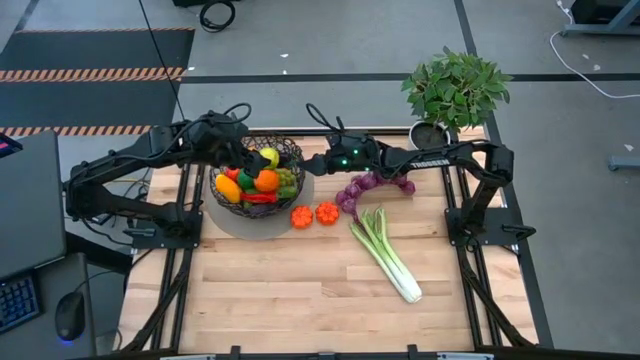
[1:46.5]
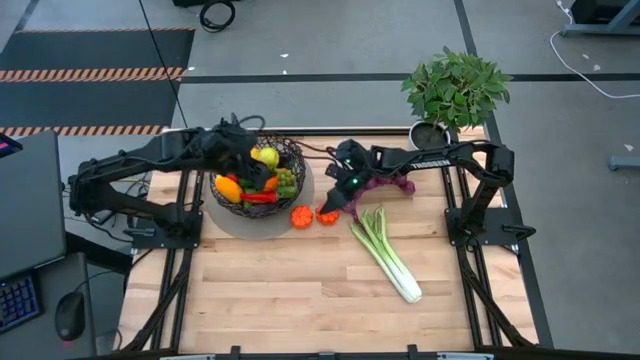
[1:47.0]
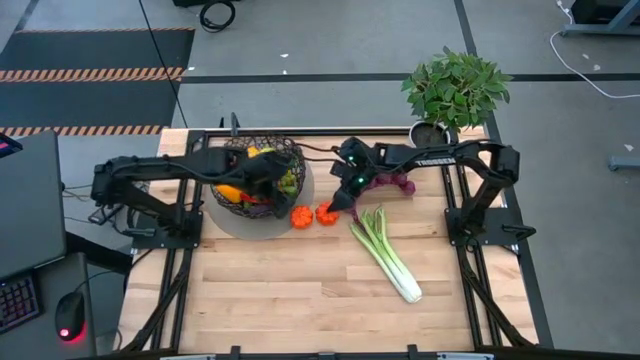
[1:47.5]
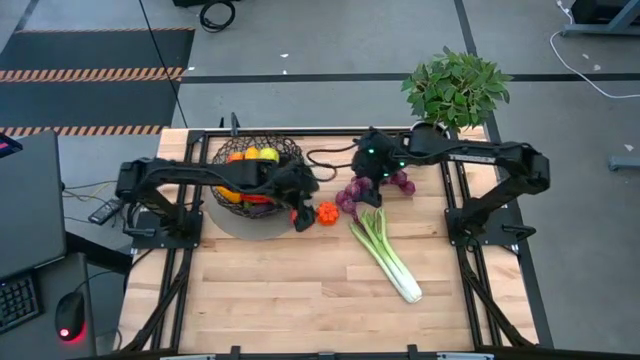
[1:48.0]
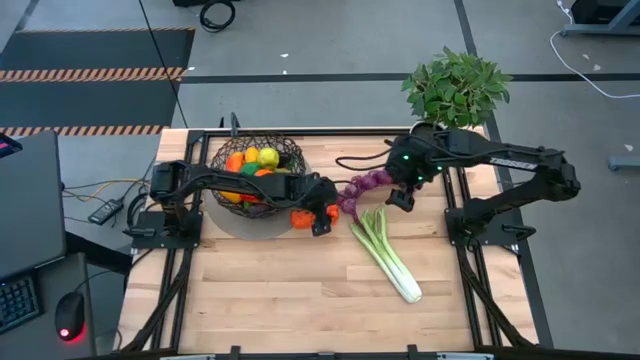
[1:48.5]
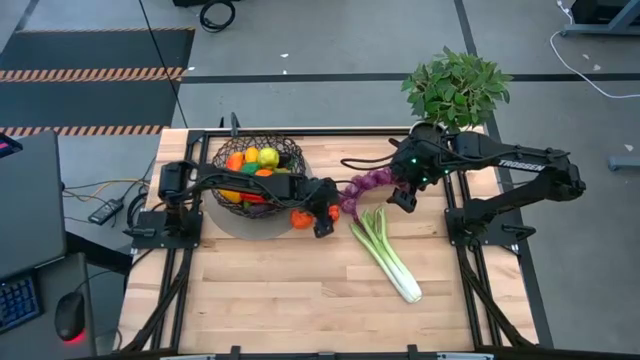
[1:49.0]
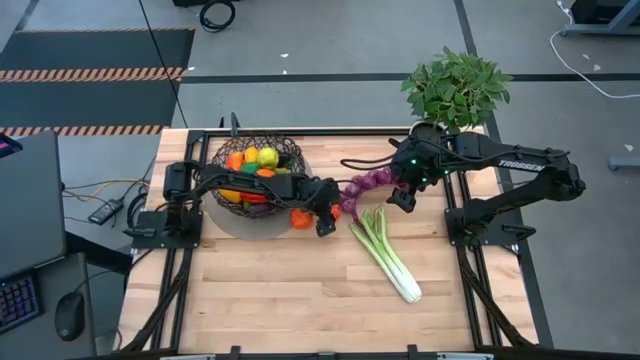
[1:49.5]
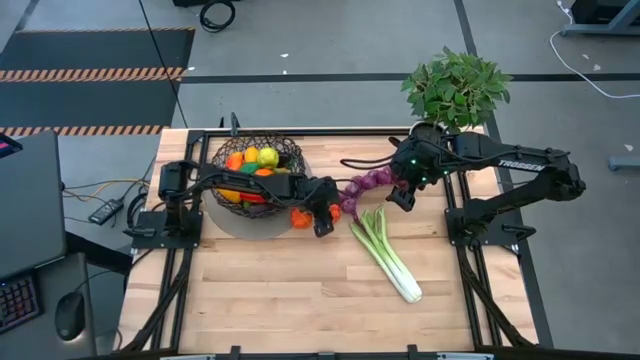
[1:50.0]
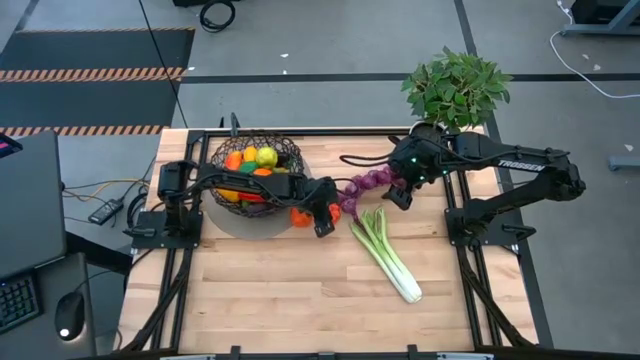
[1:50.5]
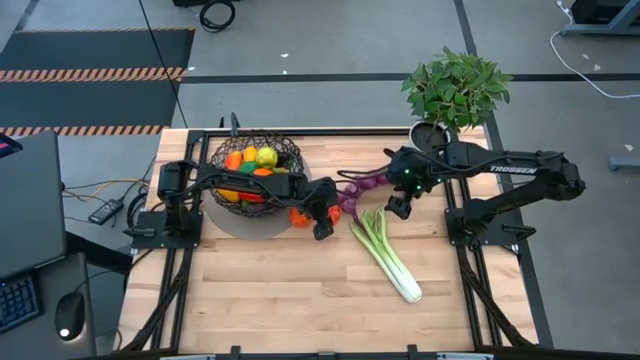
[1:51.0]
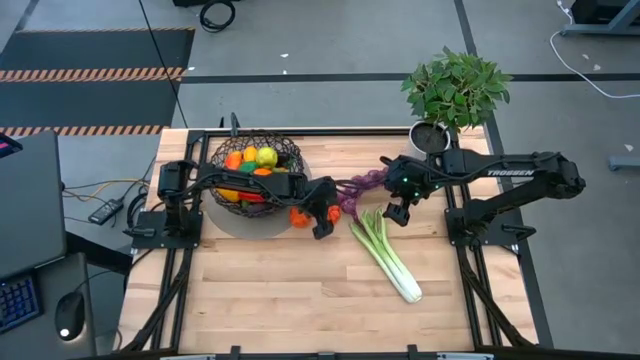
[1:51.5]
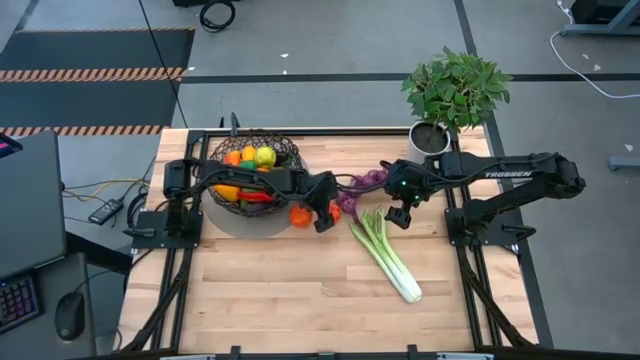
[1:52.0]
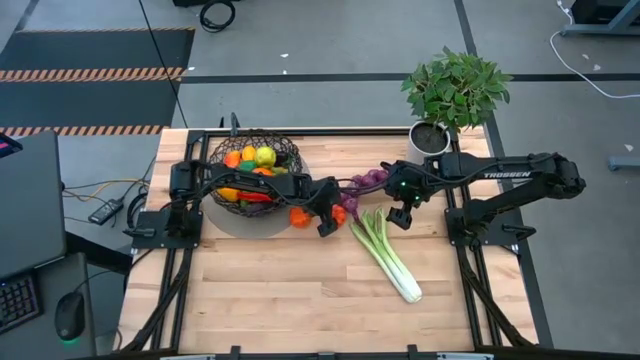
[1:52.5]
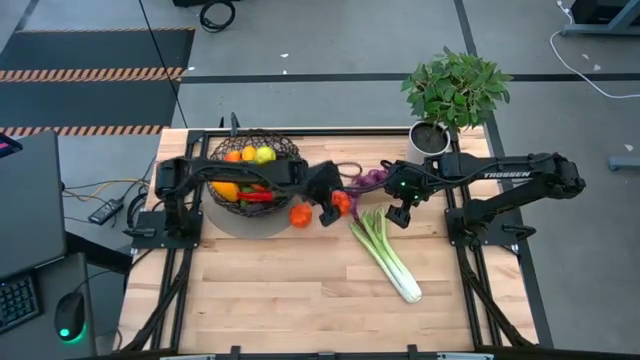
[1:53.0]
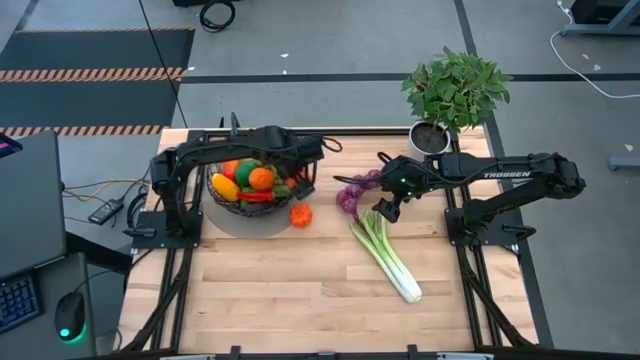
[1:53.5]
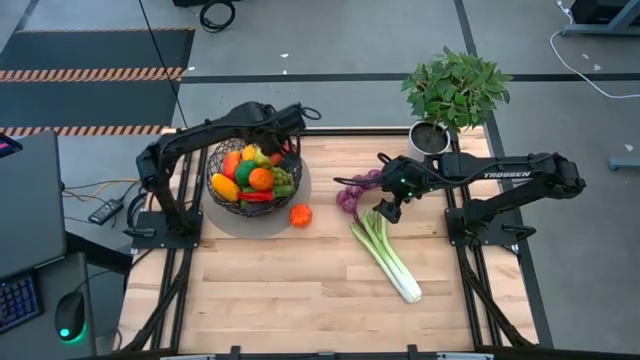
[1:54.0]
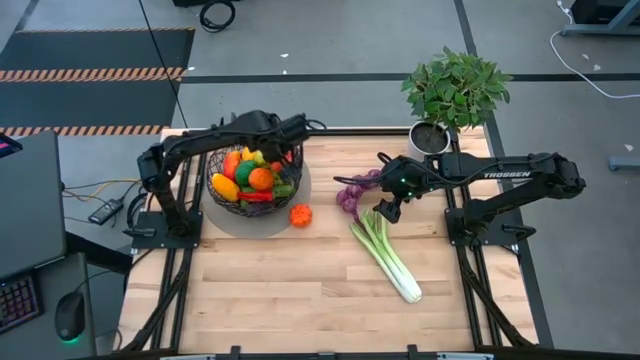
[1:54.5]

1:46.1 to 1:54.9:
Task: Build produce basket
Put the right orange pumpkin into the black wire basket

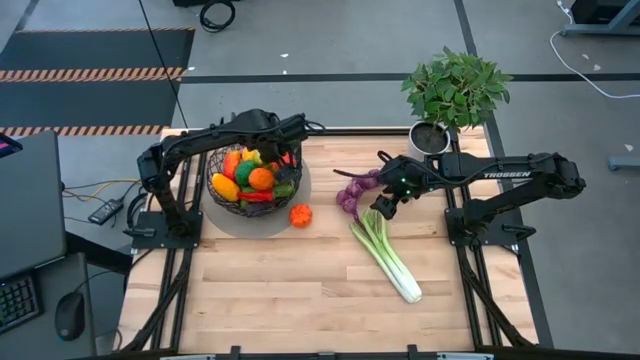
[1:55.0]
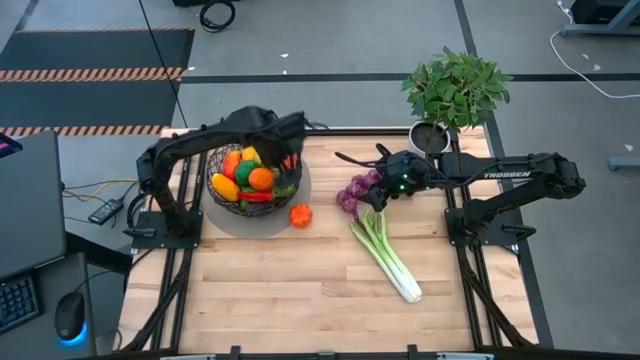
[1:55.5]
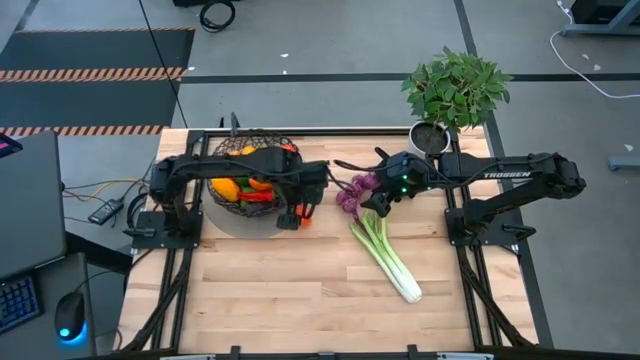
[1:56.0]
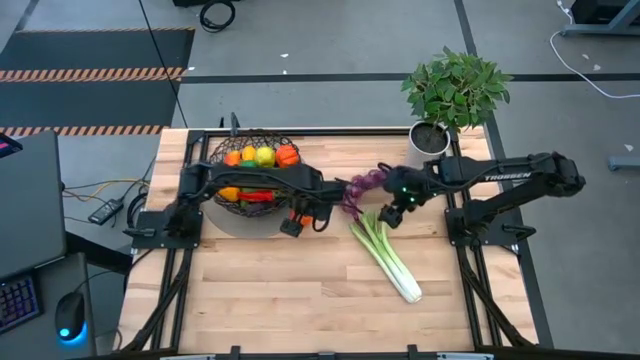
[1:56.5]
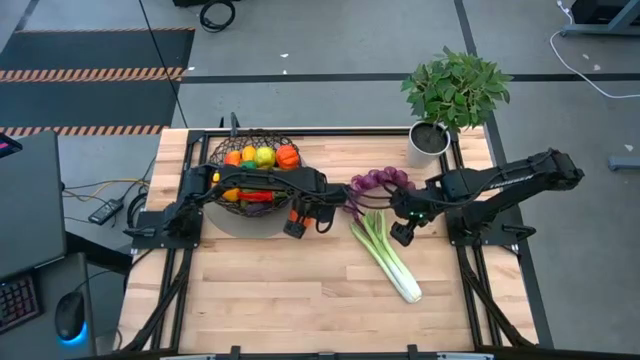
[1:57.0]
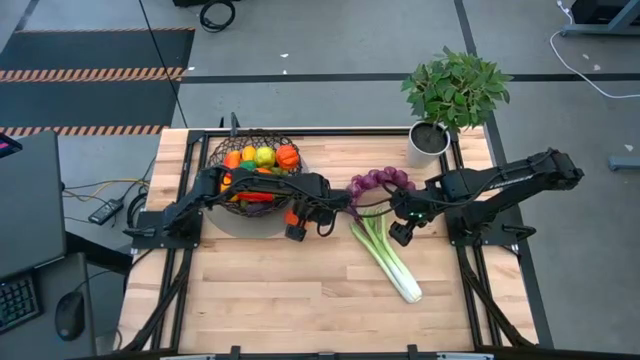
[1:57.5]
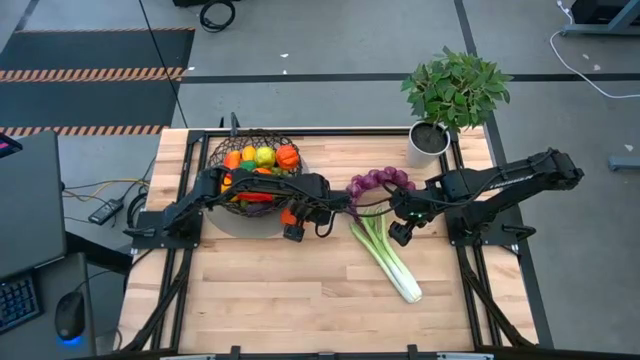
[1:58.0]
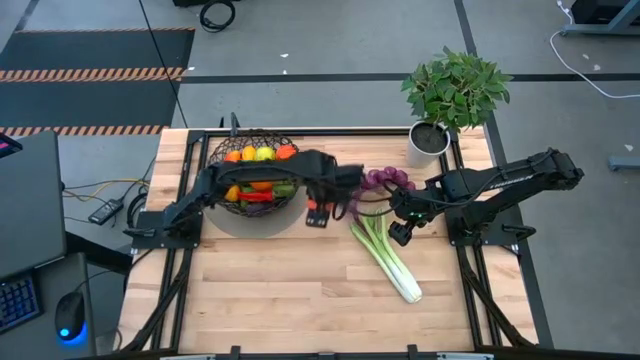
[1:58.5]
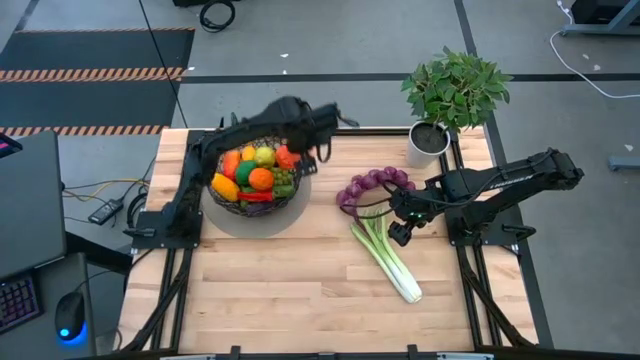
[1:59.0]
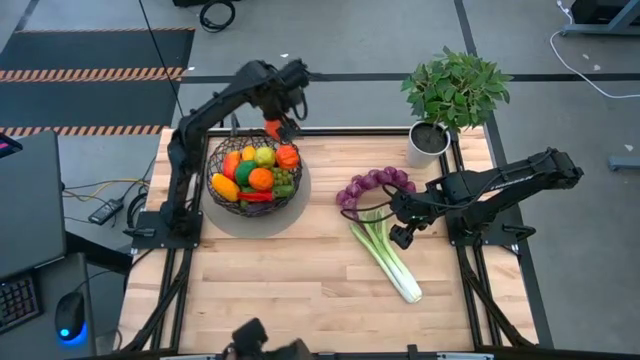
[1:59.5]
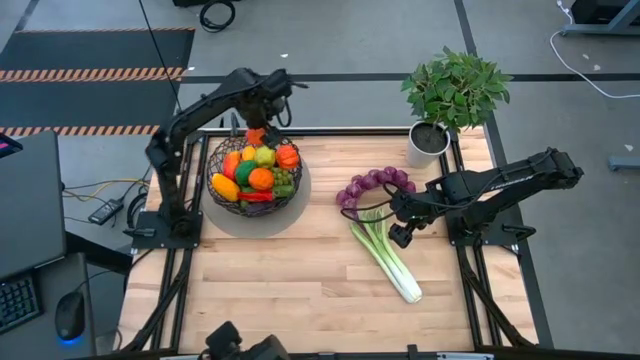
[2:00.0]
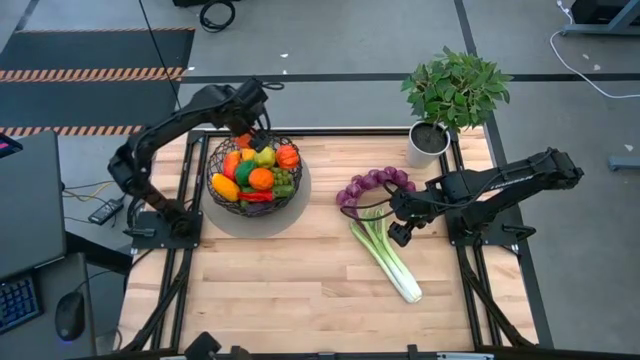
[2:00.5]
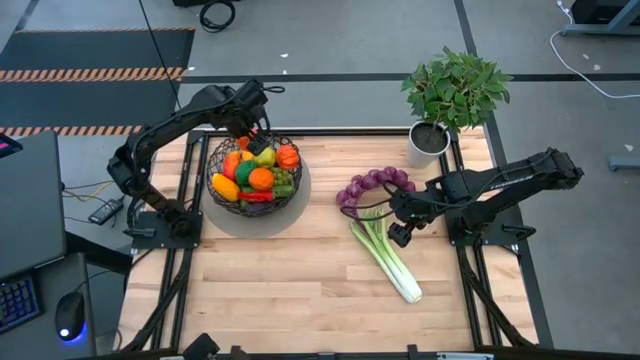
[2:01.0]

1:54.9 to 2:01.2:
Put the orange pumpkin into the black wire basket

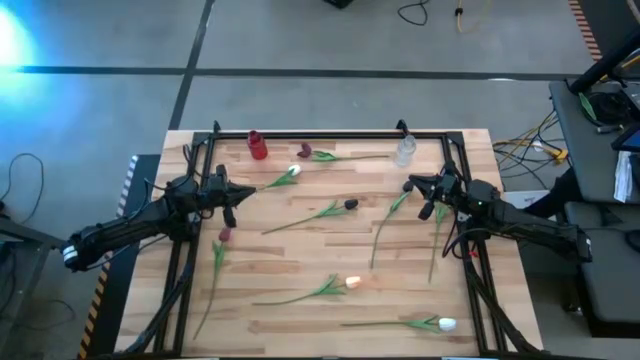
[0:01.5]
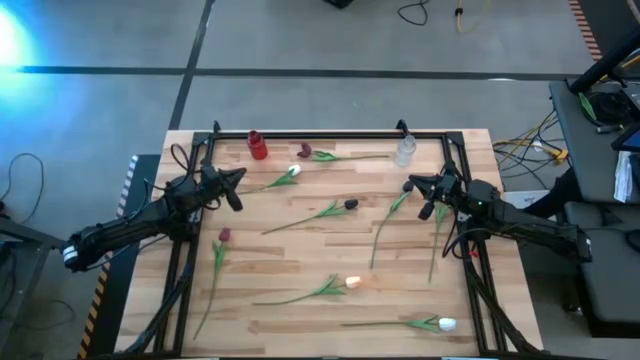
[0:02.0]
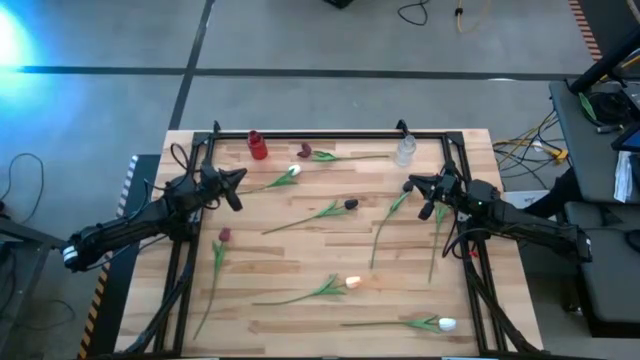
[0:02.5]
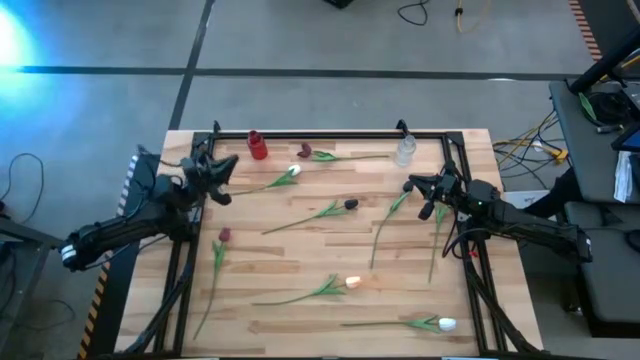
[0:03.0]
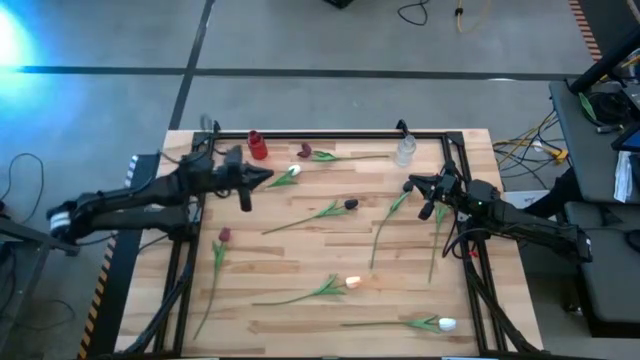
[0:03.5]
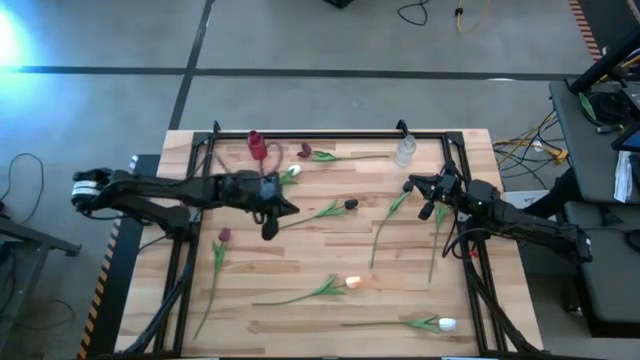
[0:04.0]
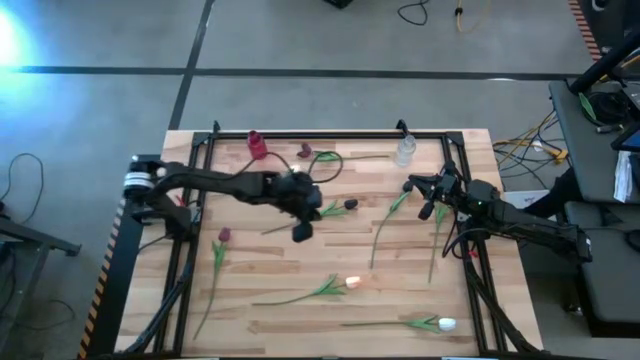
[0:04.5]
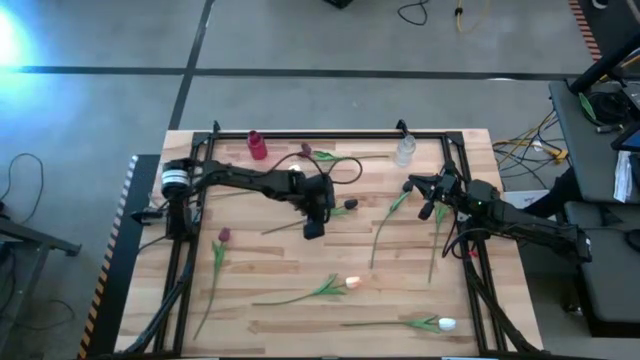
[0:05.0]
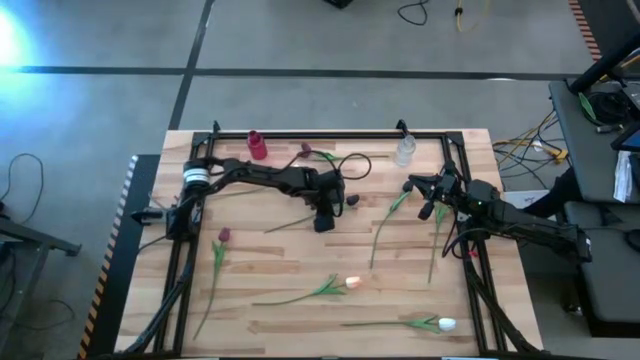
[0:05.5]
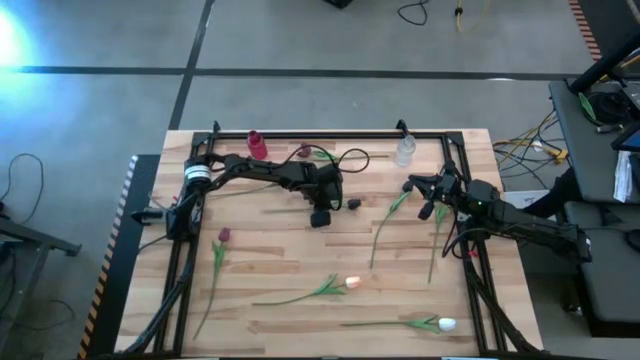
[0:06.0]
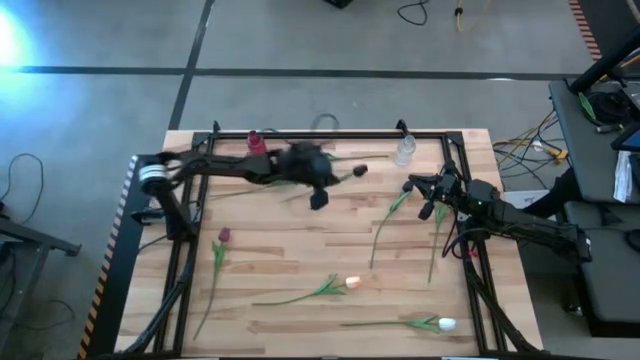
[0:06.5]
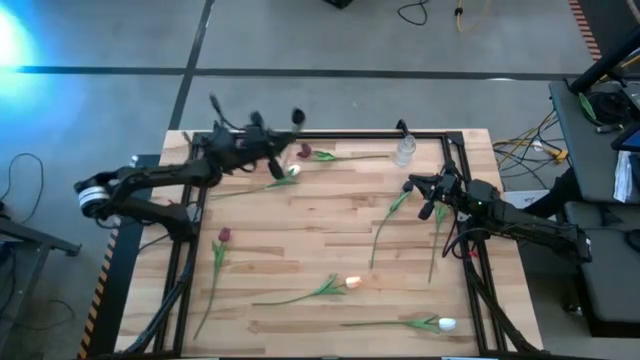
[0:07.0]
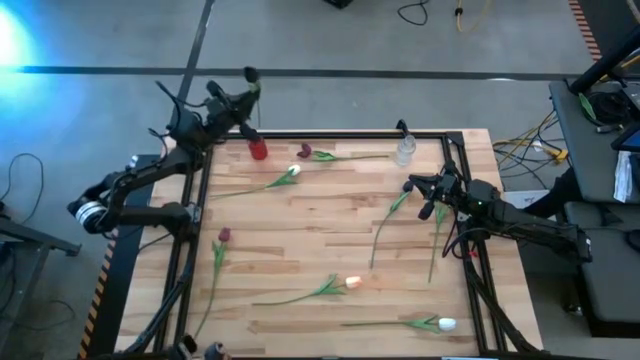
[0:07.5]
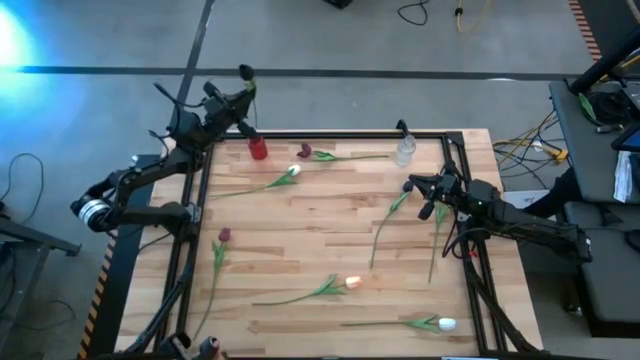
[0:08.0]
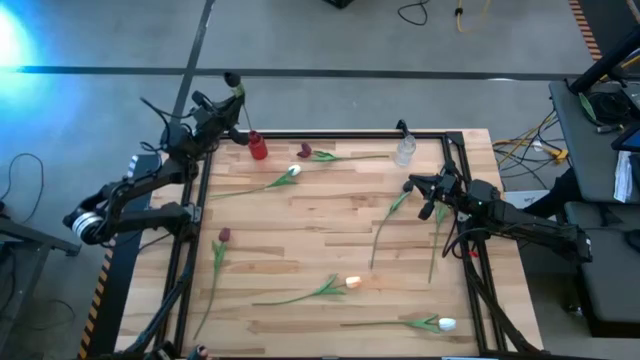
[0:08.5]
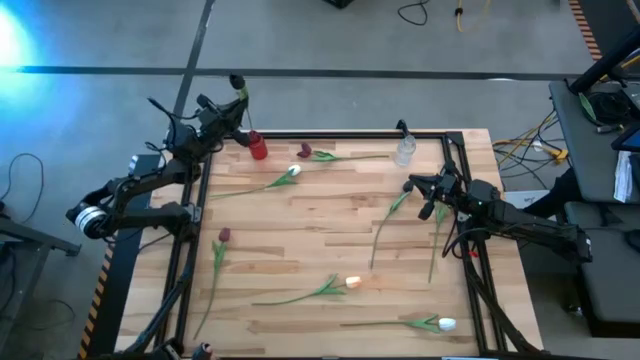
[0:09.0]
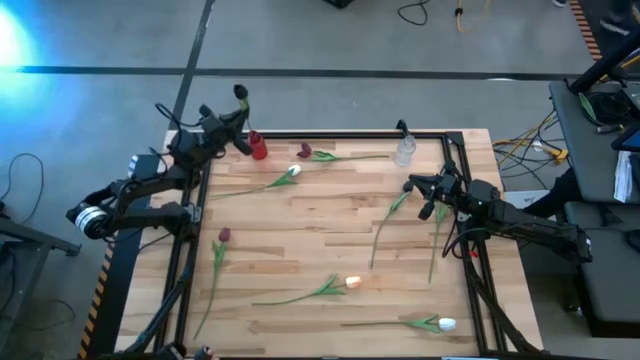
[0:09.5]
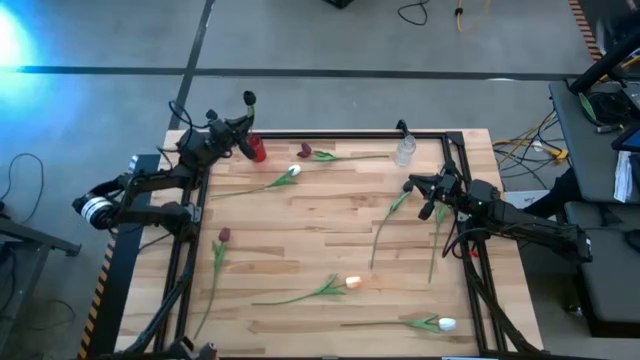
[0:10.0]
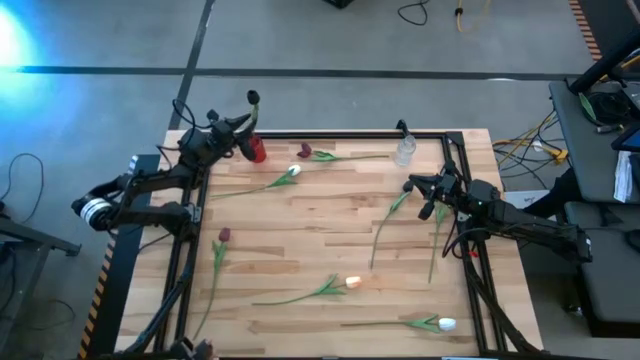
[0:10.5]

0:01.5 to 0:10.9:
Task: Sort flowers into vase by color
Put the left black flower into the red vase
